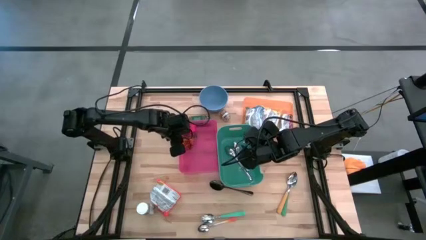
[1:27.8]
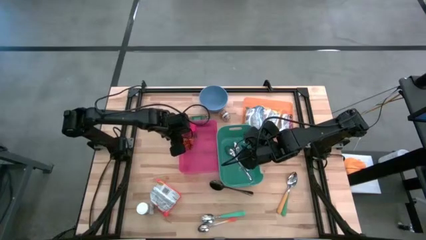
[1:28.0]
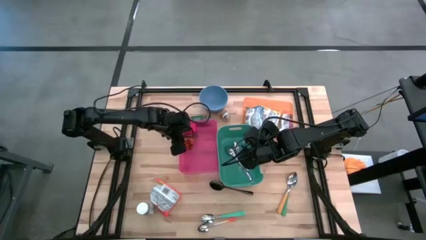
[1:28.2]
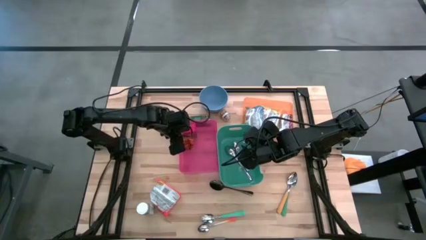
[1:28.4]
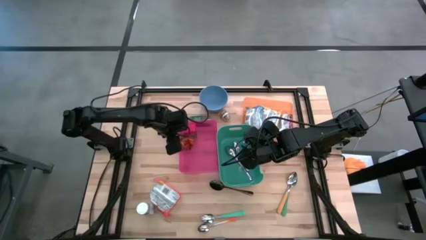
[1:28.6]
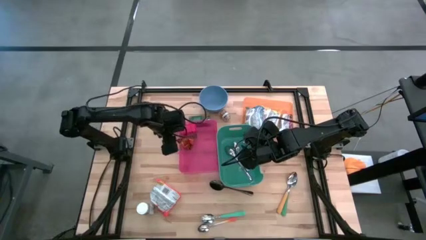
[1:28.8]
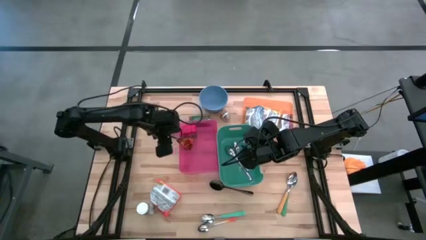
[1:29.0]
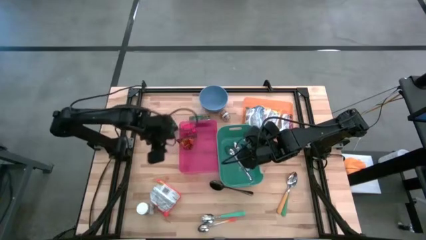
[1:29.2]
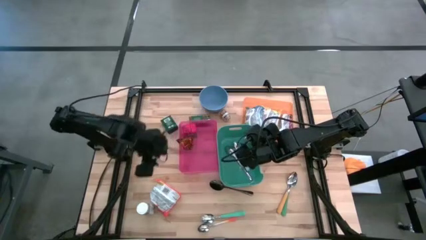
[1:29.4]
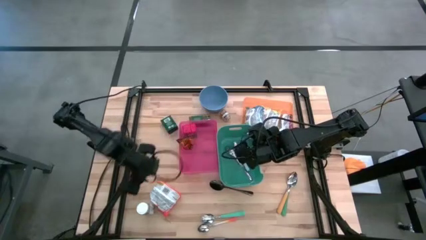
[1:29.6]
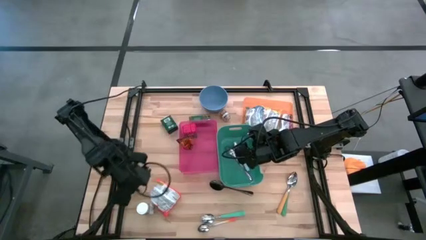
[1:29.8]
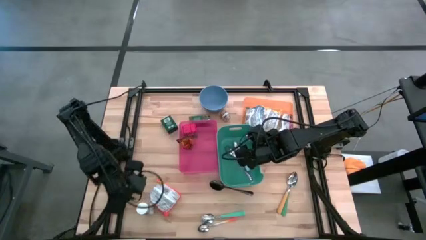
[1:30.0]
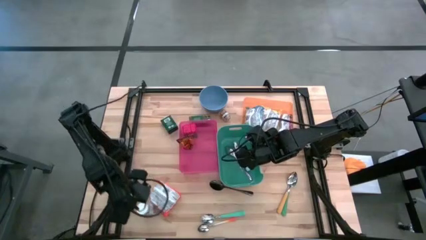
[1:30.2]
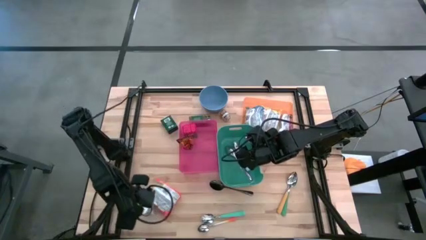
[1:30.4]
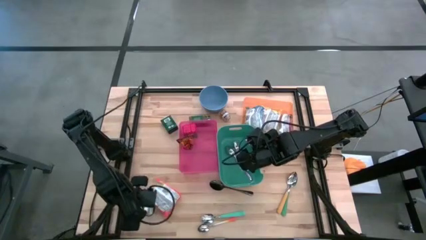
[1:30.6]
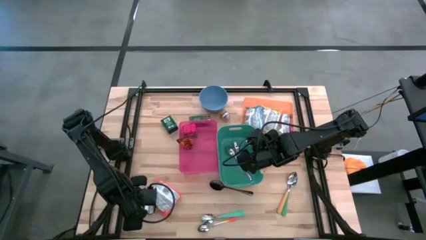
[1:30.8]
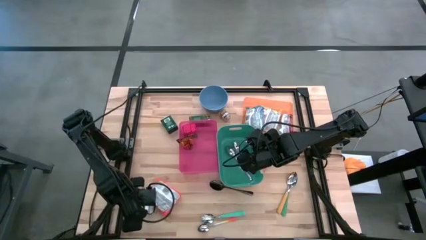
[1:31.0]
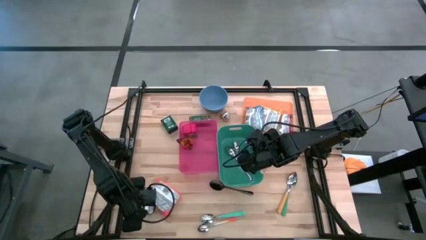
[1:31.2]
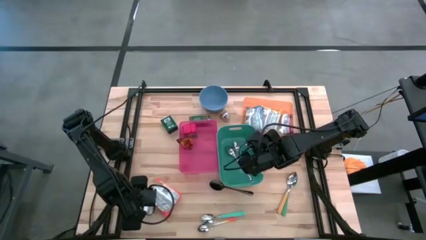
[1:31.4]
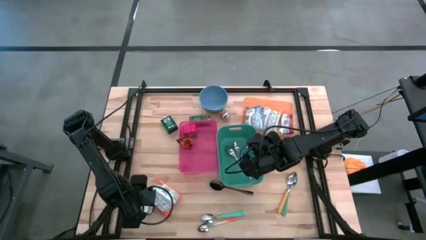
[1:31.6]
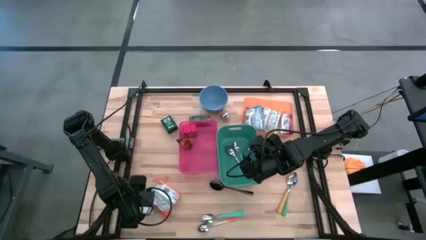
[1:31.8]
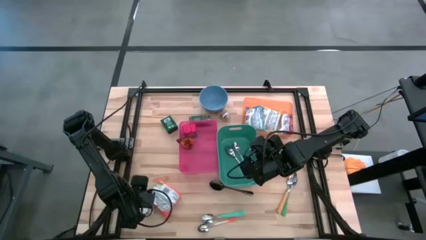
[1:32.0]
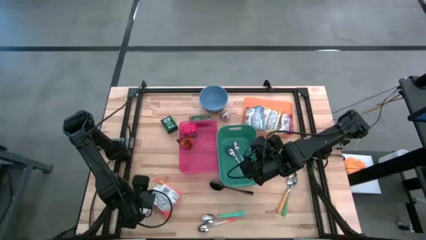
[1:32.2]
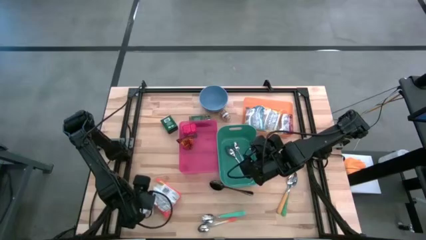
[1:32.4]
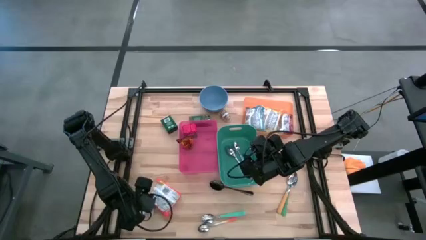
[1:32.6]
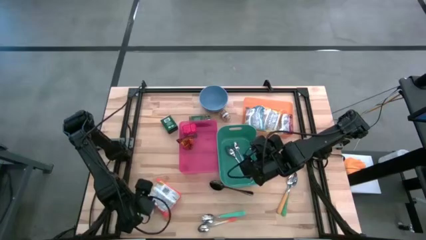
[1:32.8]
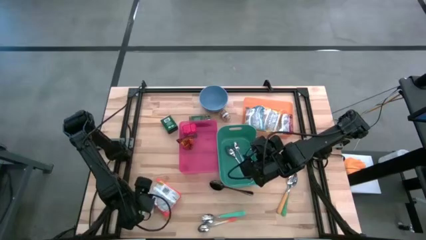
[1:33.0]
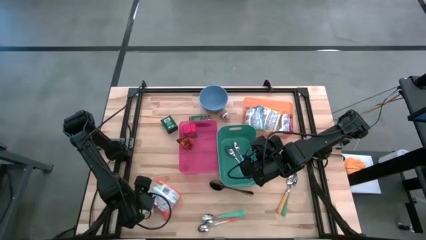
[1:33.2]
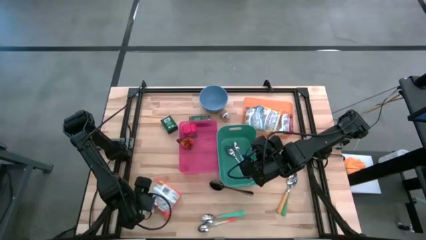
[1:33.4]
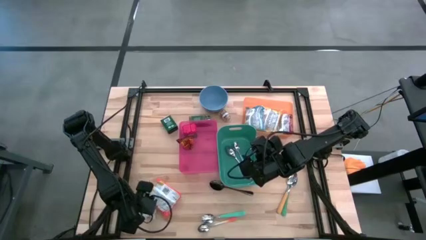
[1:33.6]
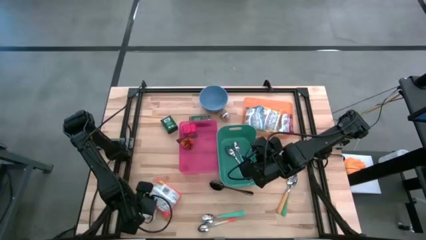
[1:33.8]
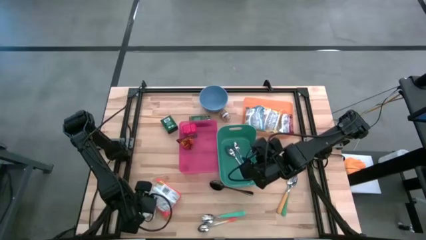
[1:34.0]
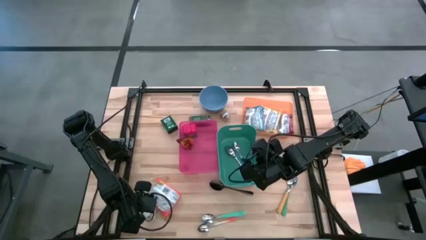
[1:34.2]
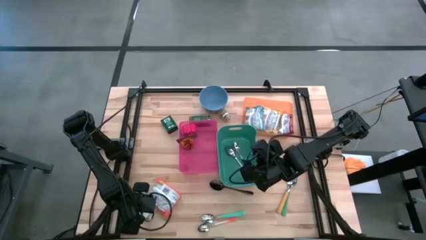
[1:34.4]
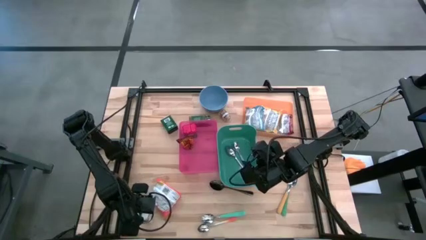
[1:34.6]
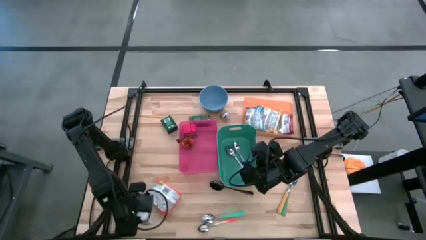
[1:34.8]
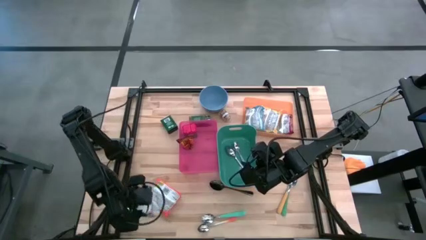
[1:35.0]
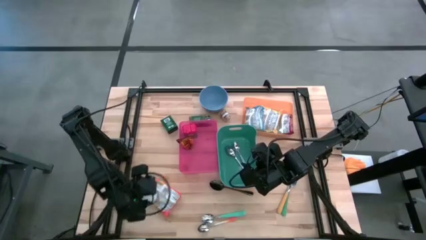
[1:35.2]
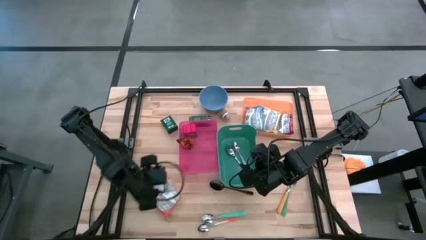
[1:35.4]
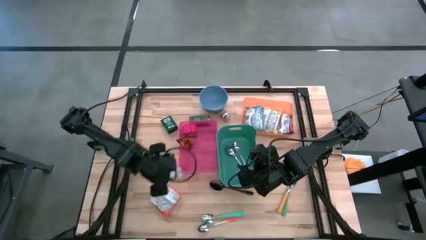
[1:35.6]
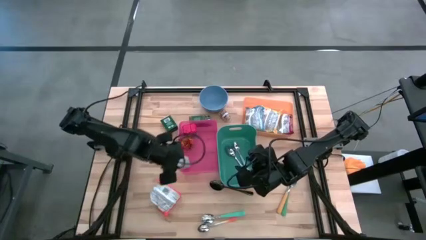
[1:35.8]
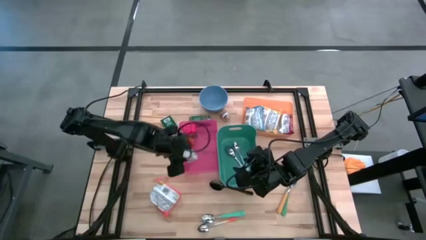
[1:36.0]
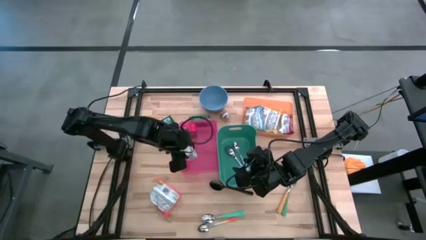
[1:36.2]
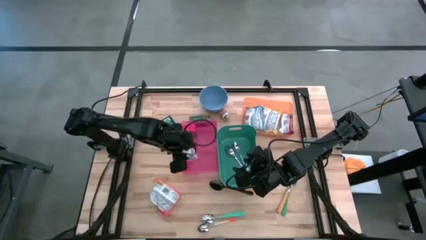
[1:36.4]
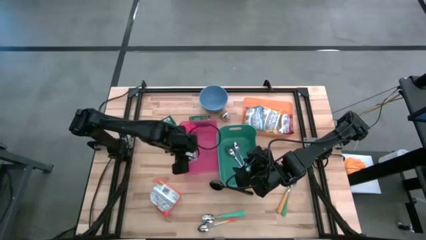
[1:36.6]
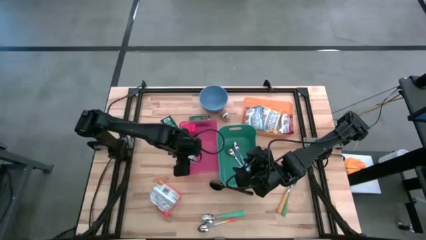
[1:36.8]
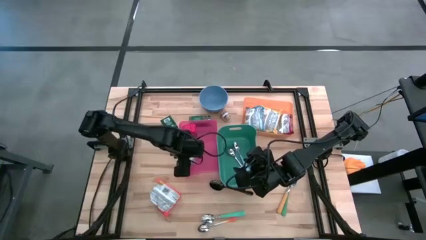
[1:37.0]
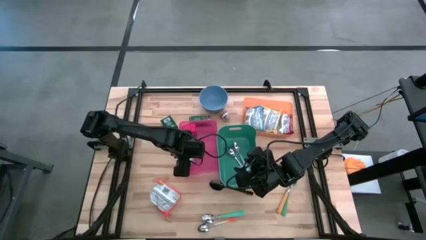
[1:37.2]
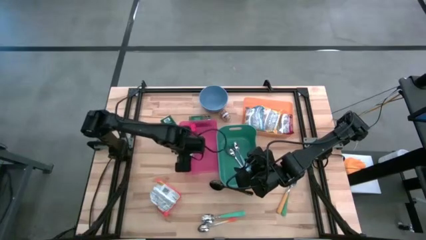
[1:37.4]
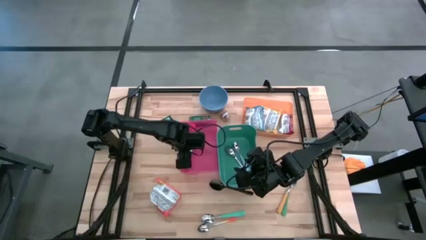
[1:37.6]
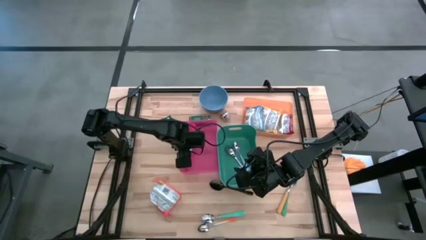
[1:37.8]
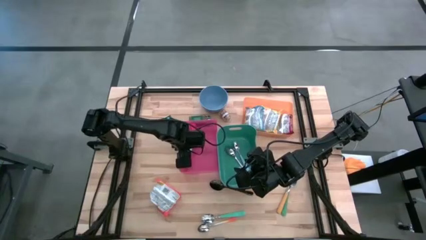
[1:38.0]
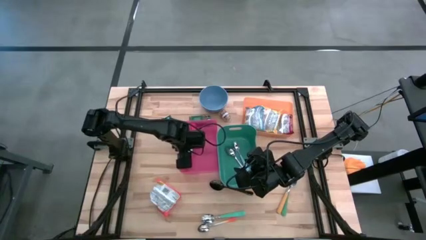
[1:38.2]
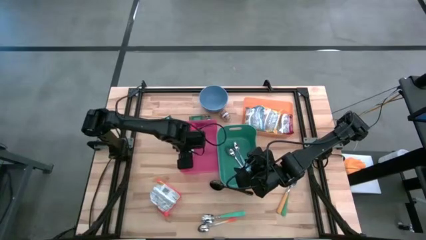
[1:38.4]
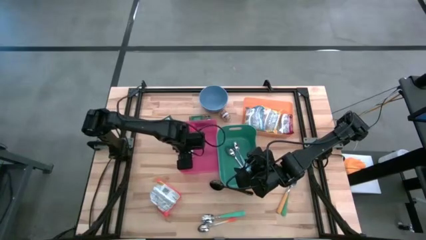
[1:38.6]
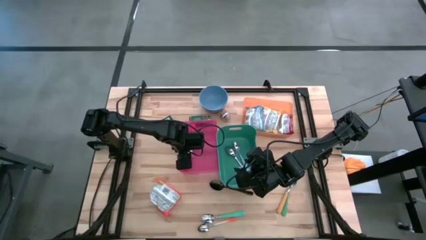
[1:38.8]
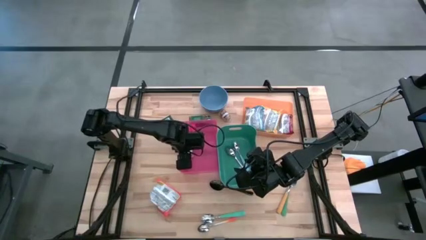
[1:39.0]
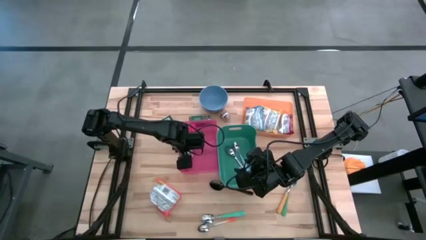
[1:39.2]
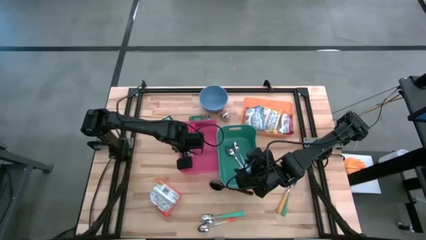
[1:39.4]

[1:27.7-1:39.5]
Put the white spice bottle into the red bin

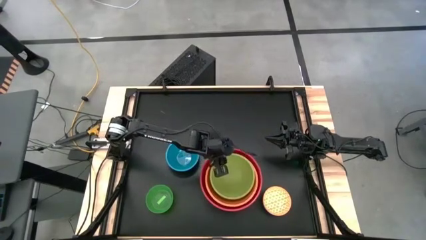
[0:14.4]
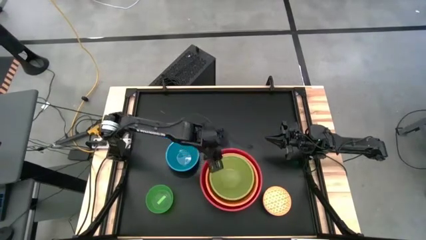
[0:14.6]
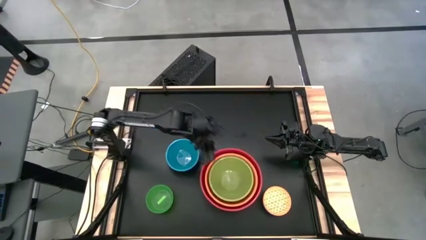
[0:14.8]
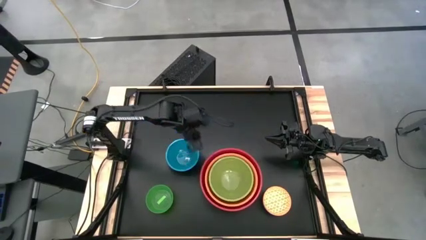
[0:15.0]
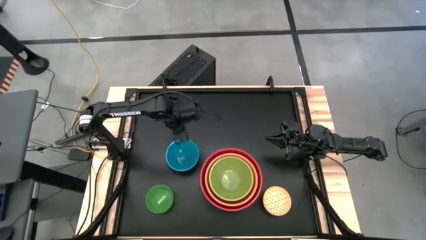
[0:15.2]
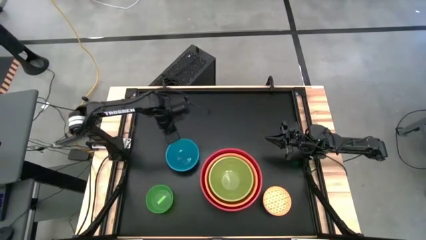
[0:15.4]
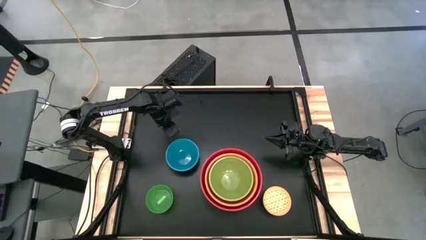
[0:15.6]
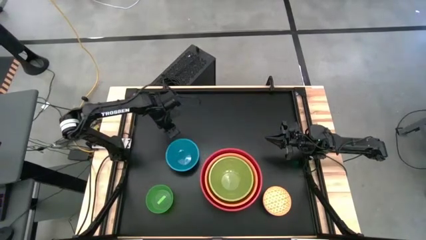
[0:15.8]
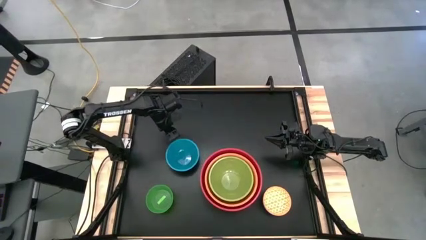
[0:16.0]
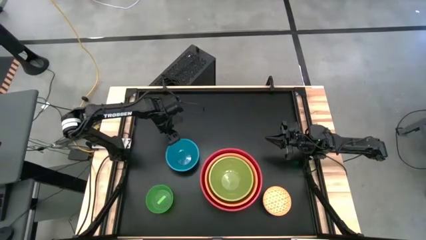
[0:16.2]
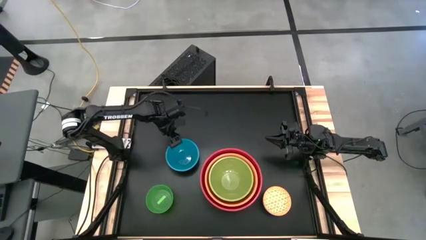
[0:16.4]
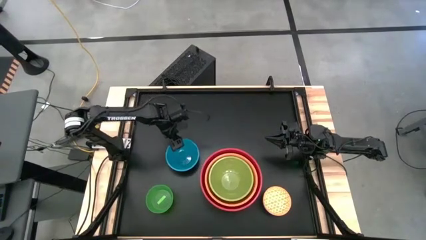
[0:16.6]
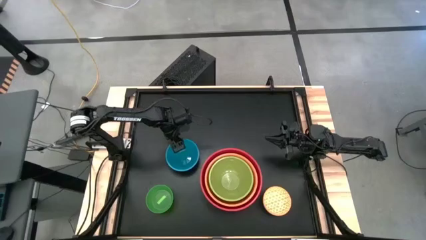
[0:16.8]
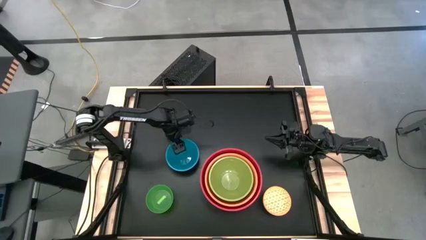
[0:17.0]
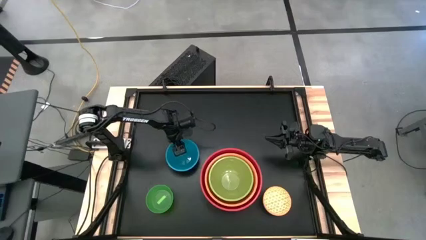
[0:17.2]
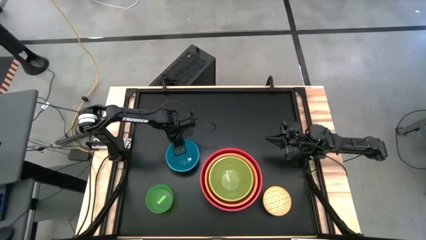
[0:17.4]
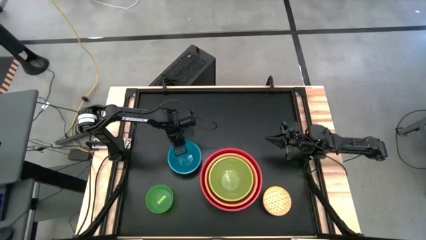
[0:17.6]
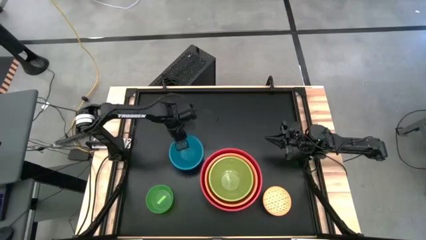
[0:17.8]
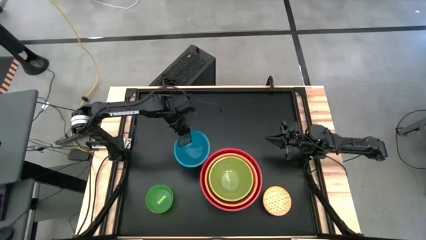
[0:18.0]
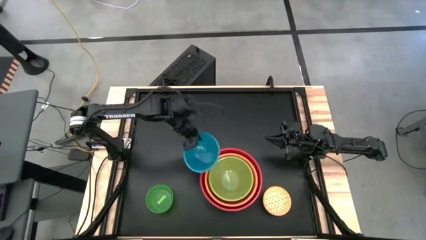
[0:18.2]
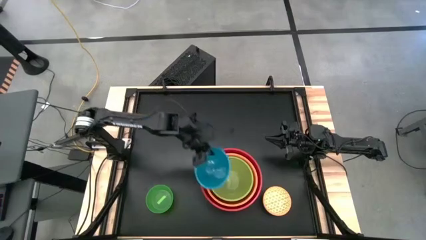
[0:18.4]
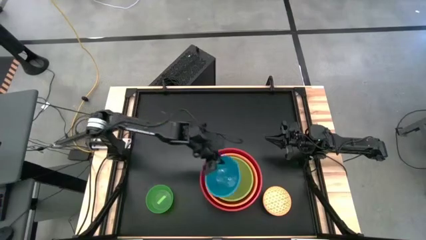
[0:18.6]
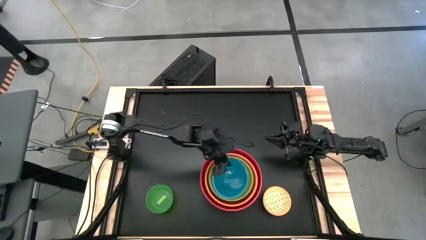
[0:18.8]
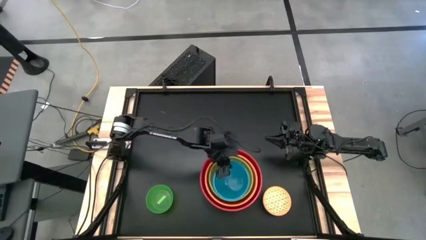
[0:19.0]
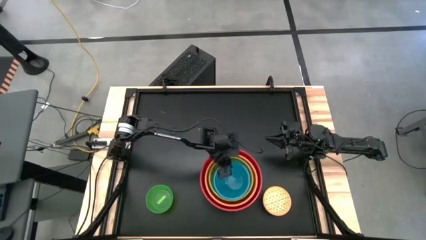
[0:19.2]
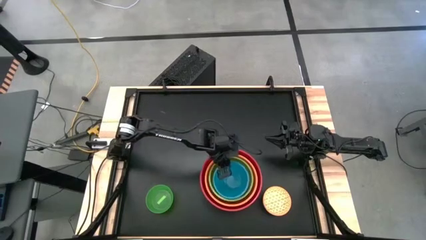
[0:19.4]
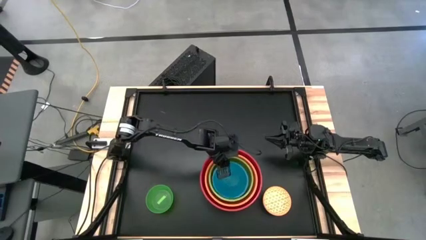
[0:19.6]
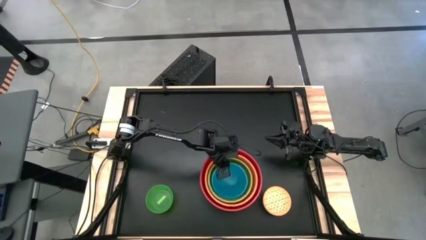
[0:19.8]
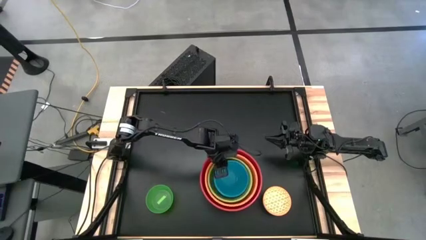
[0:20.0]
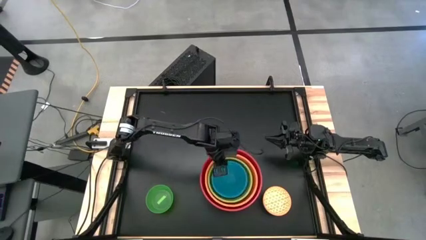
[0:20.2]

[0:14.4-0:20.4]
Stack the blue bowl on top of the green bowl
